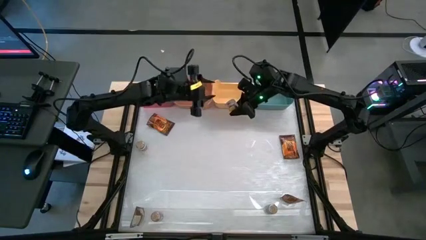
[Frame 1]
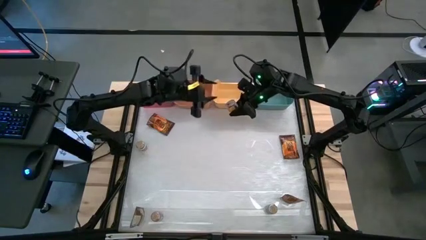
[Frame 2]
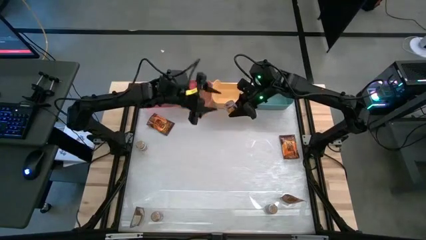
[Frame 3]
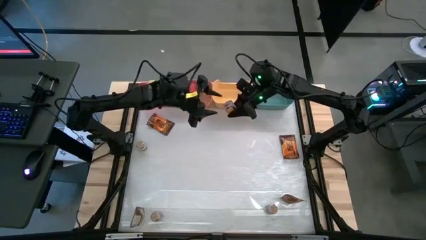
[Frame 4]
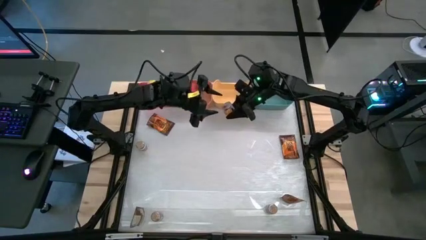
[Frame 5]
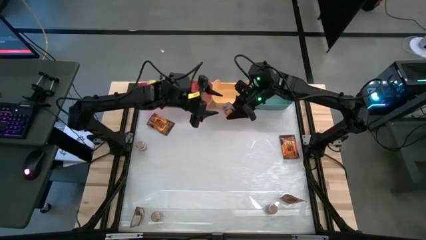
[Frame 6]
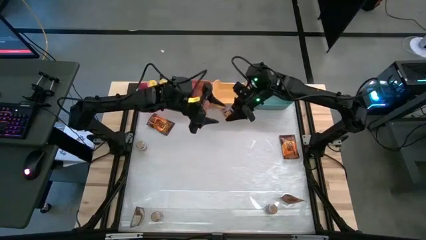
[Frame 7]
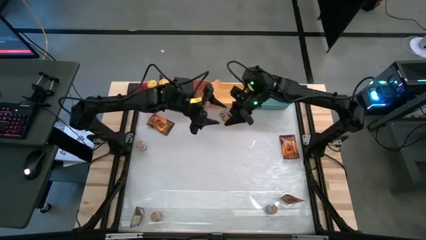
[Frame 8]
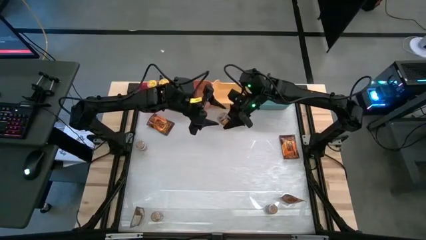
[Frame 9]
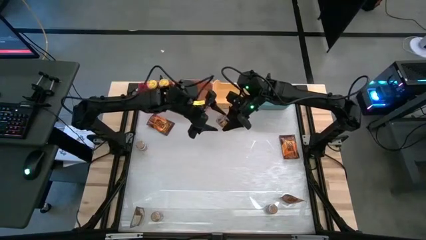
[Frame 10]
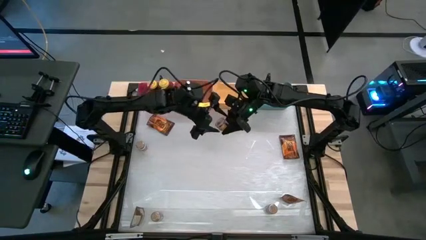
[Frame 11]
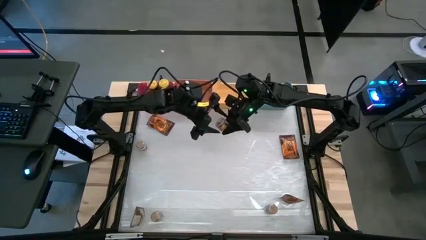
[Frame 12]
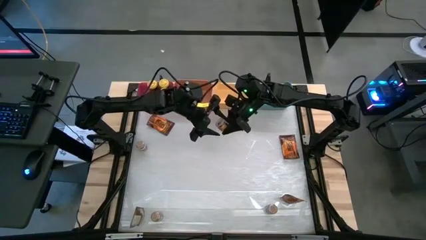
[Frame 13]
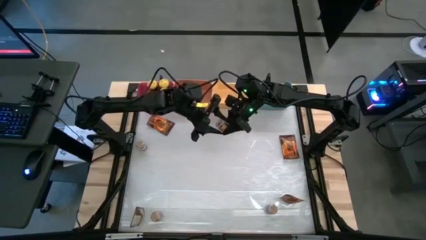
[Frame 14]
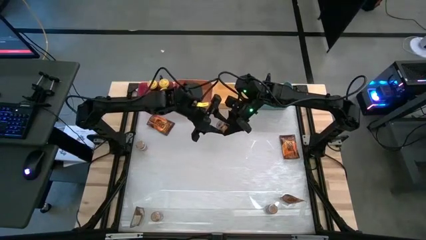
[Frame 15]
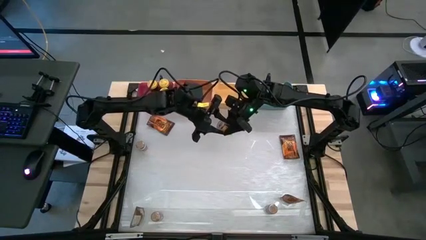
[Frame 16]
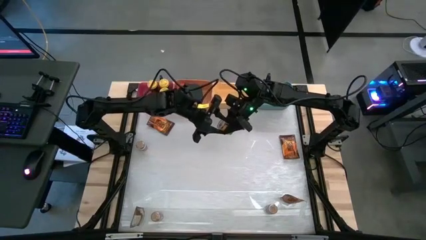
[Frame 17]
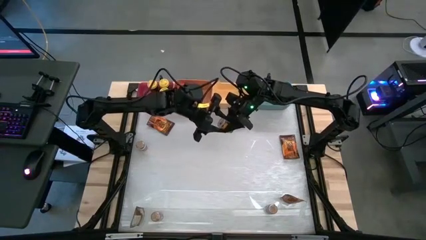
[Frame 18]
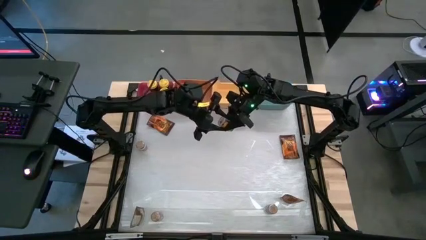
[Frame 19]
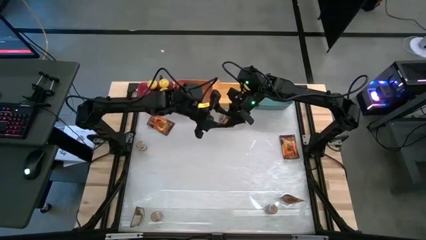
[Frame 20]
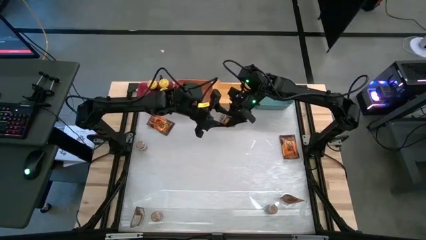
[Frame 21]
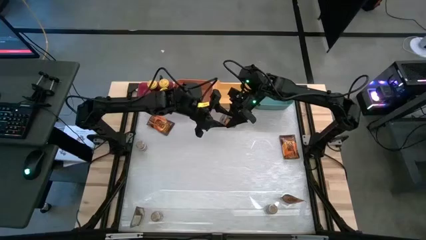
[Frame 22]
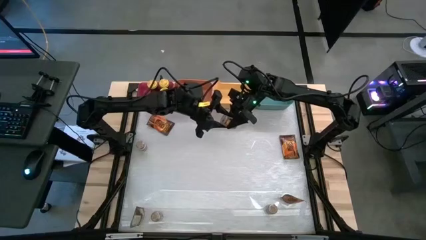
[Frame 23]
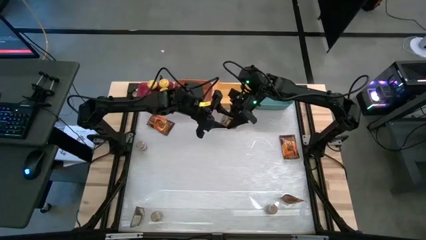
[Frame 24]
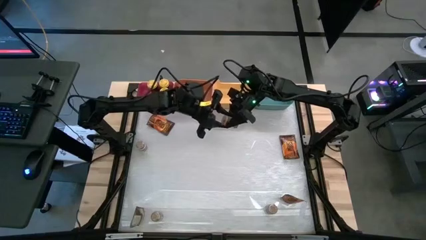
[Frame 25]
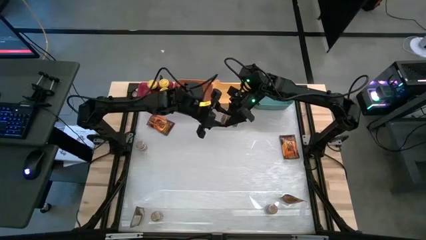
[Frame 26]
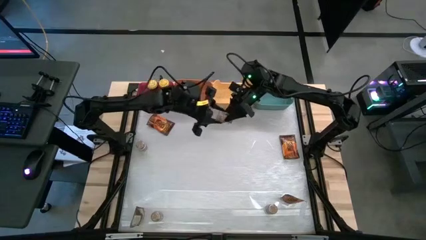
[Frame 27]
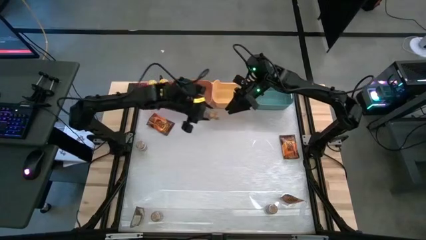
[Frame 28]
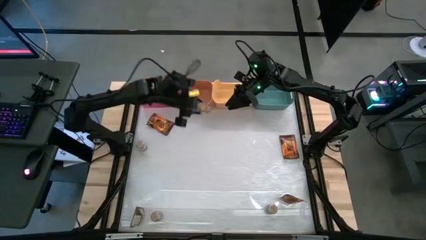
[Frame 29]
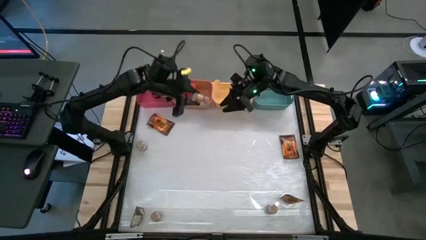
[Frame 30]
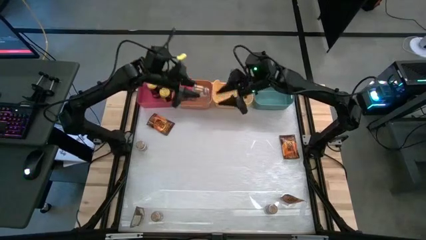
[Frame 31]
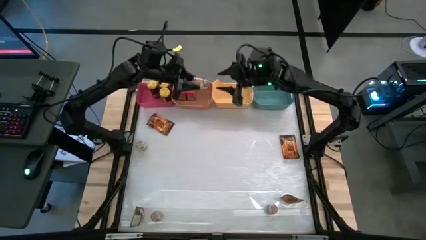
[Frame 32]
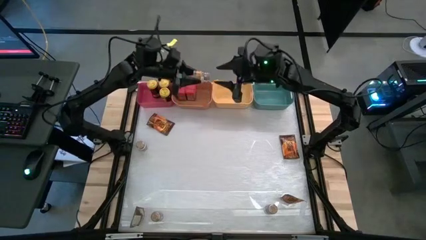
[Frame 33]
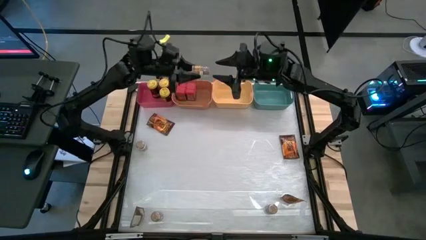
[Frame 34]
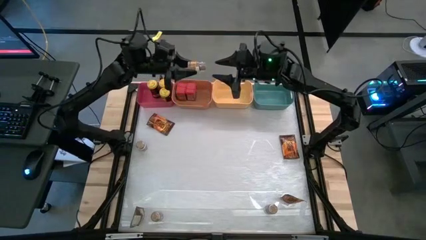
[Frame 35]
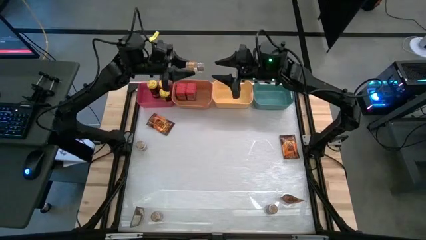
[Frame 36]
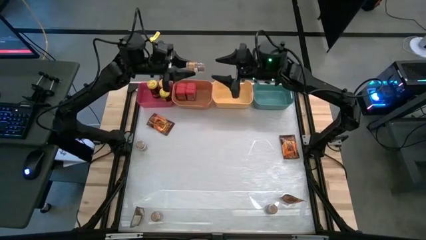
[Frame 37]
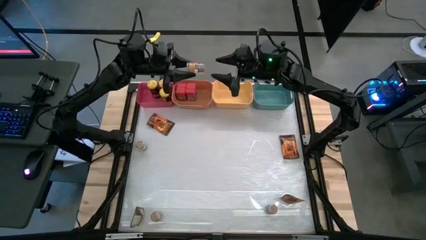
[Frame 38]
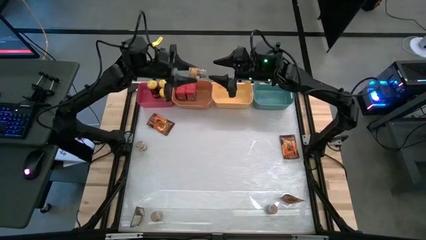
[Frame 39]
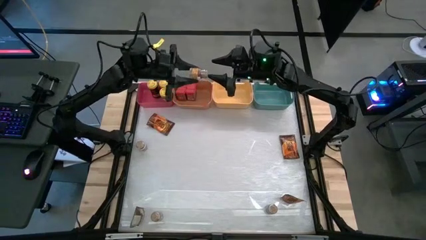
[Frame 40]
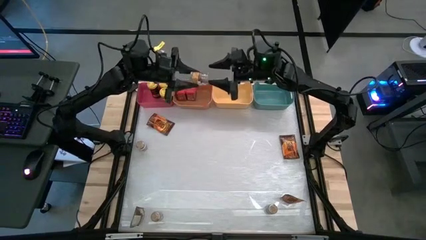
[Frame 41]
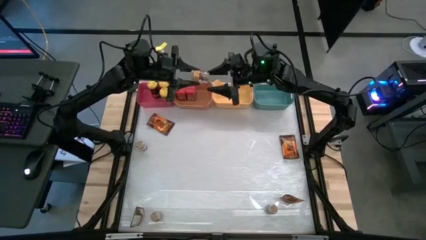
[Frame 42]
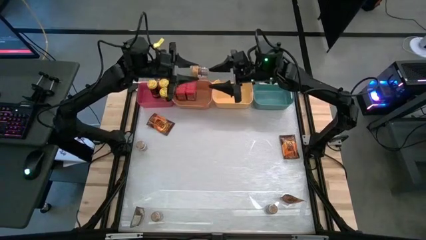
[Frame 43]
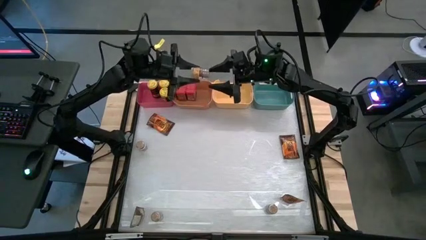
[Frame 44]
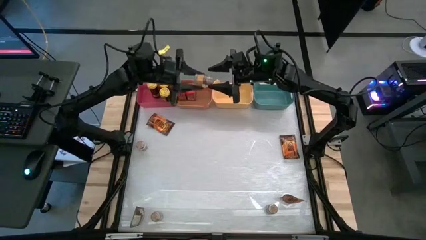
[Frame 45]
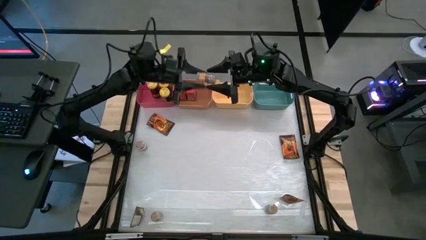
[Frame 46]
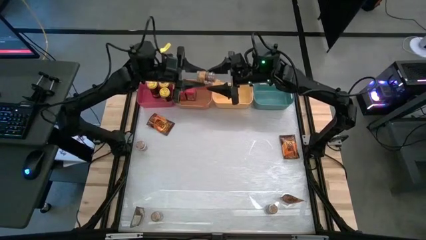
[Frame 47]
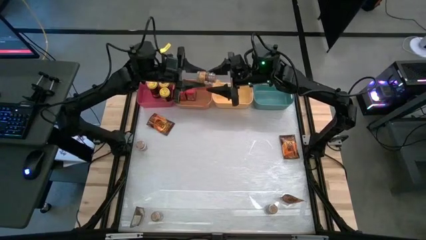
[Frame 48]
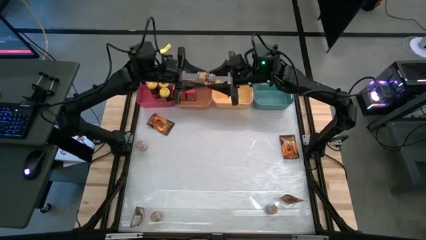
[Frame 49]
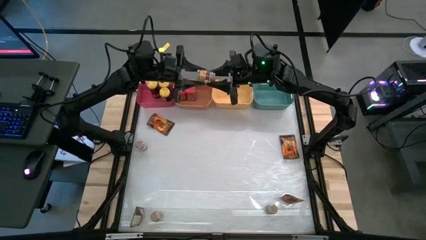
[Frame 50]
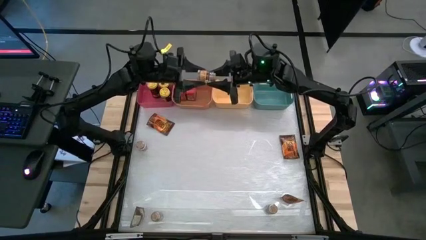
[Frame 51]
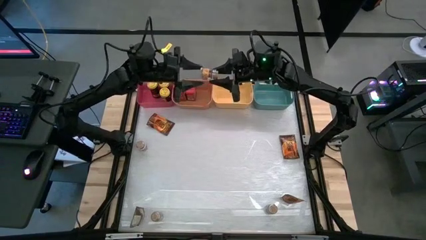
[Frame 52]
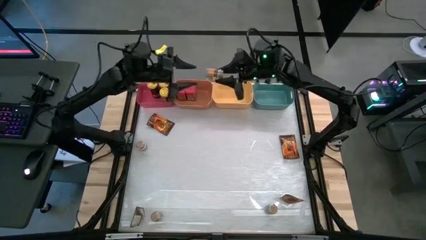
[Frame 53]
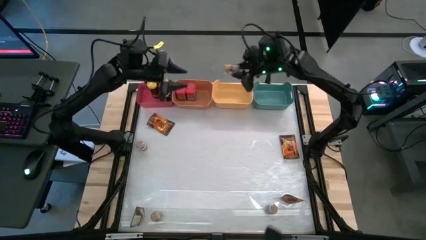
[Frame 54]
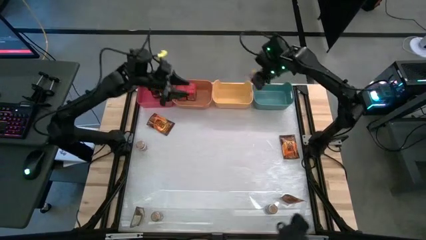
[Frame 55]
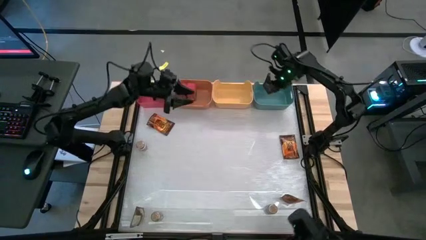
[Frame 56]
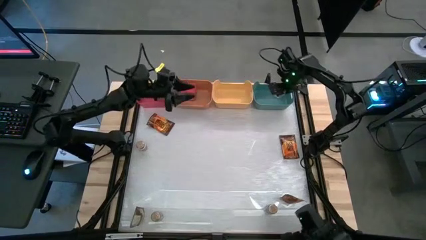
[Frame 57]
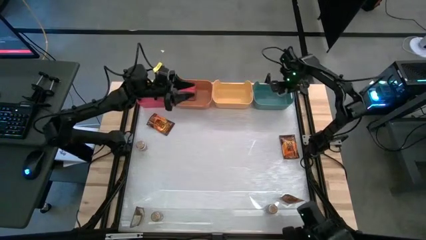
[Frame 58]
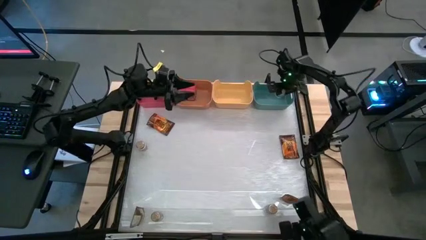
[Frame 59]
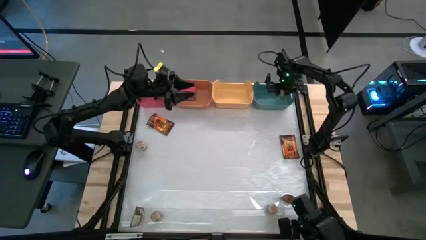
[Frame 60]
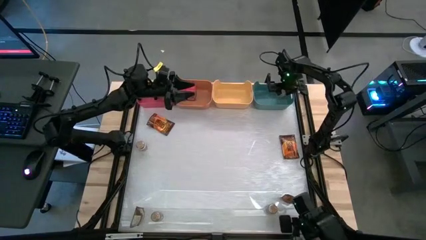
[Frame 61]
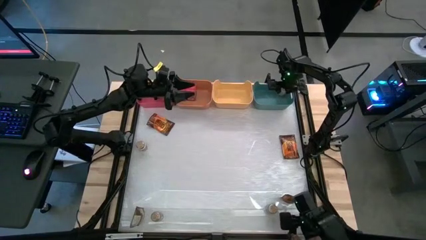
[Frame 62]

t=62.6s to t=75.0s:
Task: Sort spices by type
Put the top right brown seasoning bottle into the blue bin
